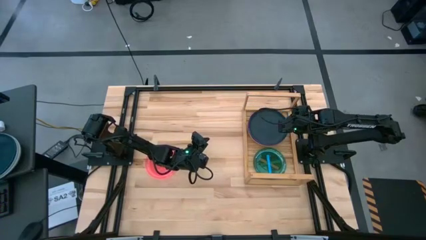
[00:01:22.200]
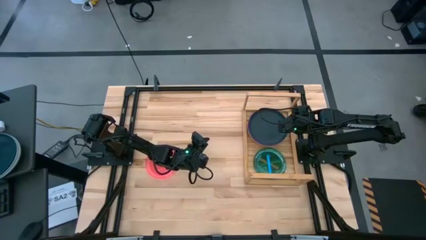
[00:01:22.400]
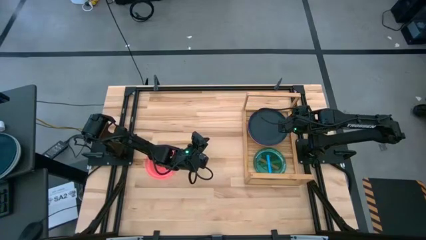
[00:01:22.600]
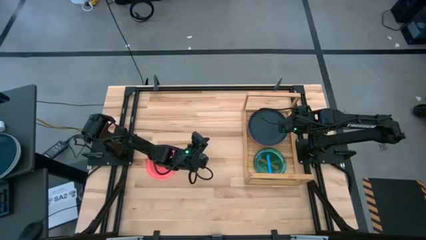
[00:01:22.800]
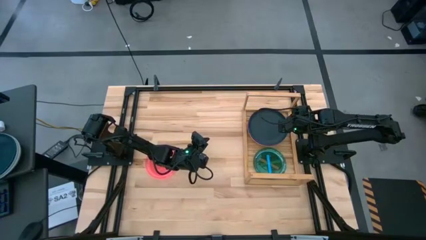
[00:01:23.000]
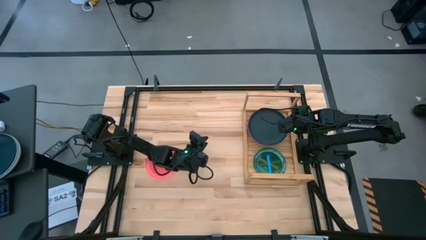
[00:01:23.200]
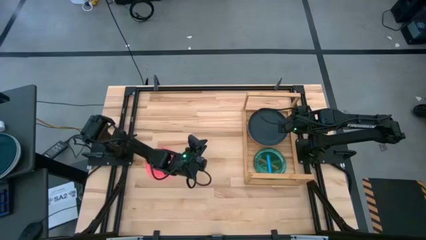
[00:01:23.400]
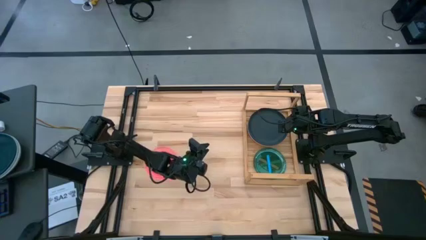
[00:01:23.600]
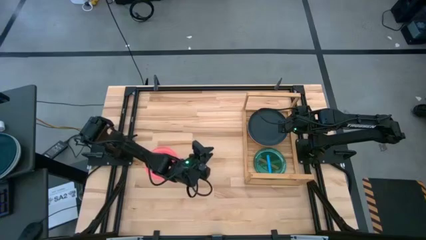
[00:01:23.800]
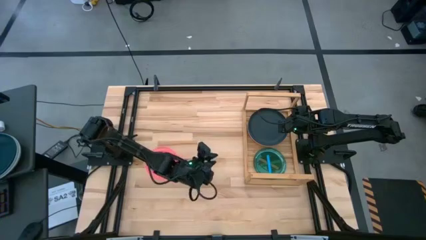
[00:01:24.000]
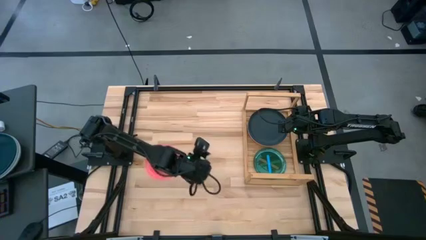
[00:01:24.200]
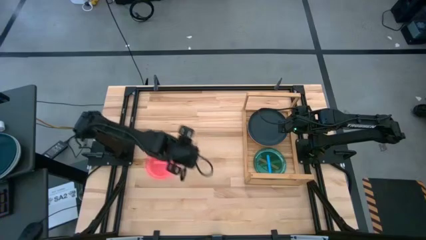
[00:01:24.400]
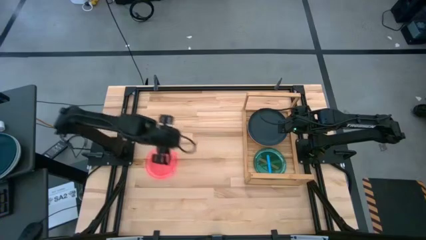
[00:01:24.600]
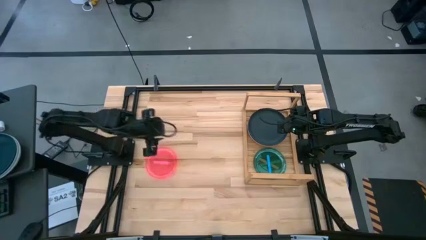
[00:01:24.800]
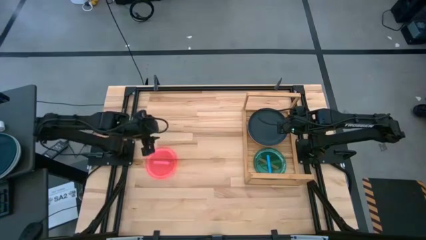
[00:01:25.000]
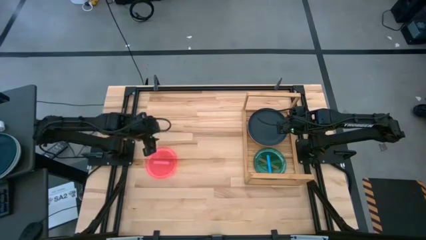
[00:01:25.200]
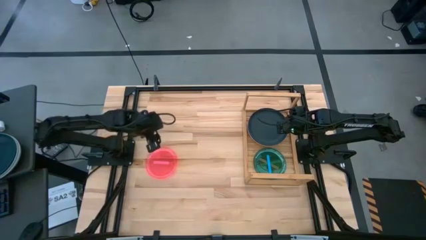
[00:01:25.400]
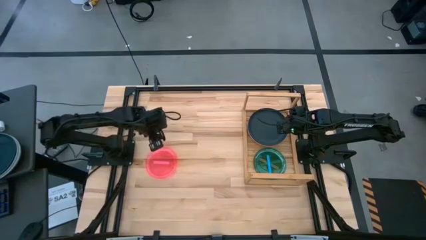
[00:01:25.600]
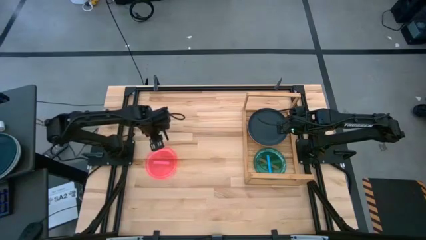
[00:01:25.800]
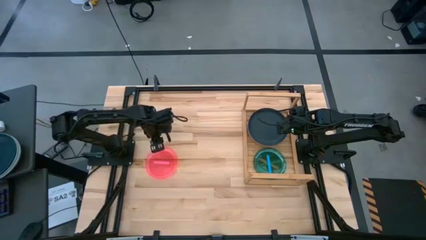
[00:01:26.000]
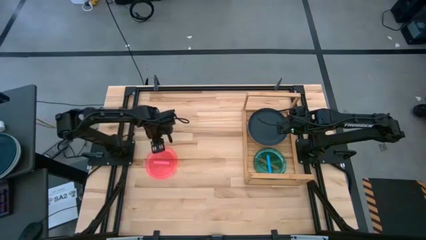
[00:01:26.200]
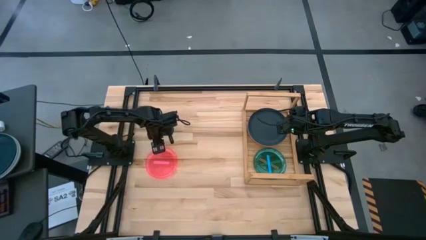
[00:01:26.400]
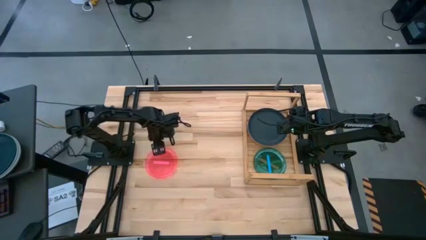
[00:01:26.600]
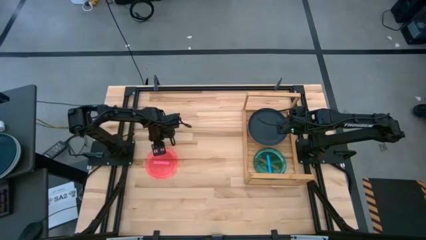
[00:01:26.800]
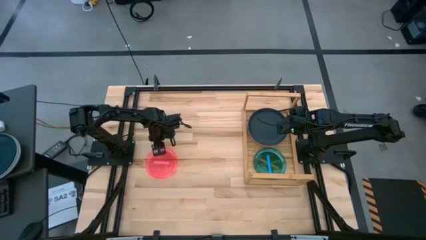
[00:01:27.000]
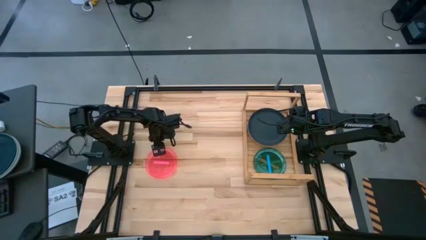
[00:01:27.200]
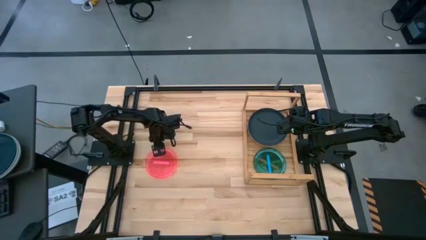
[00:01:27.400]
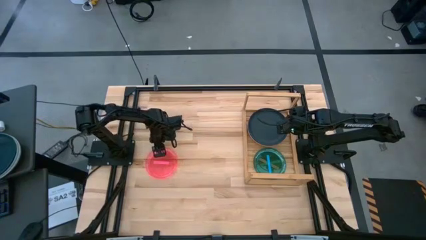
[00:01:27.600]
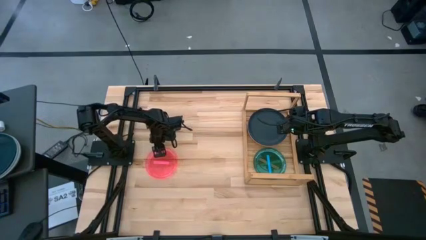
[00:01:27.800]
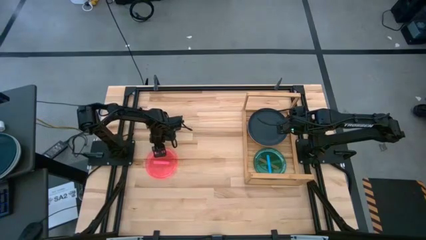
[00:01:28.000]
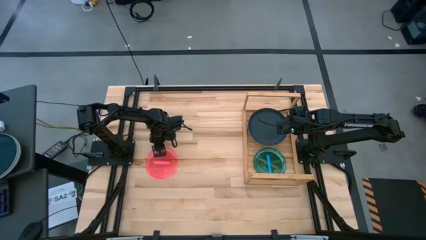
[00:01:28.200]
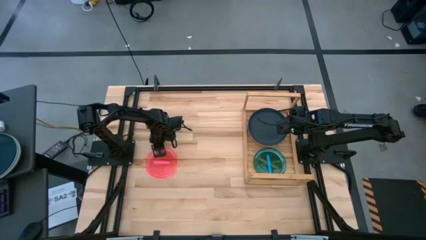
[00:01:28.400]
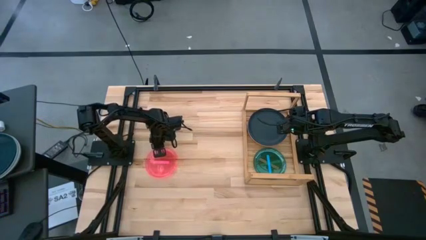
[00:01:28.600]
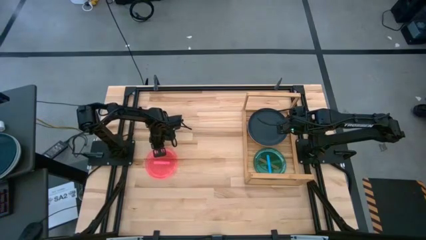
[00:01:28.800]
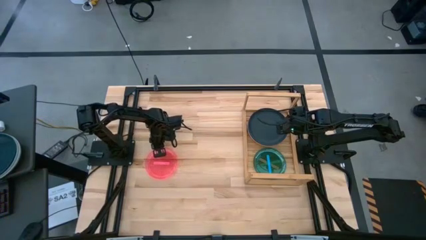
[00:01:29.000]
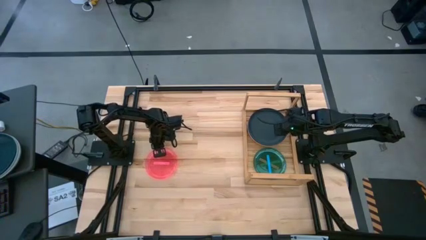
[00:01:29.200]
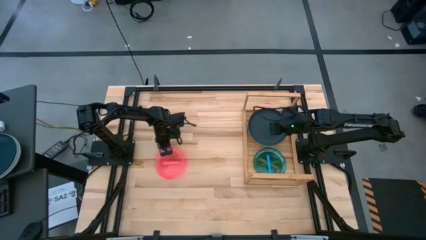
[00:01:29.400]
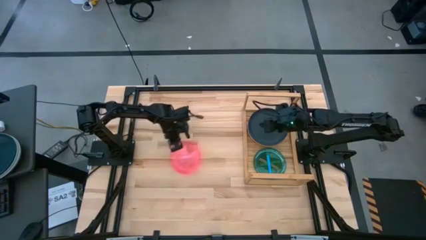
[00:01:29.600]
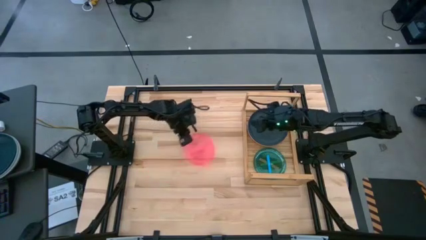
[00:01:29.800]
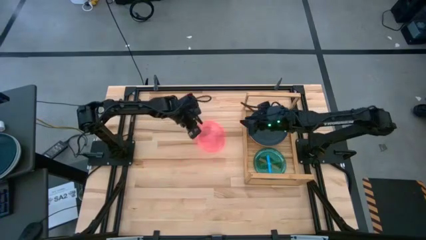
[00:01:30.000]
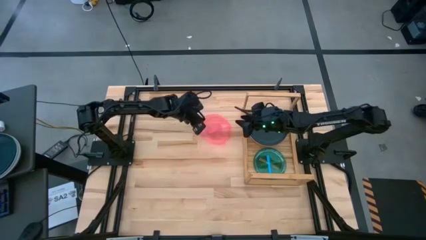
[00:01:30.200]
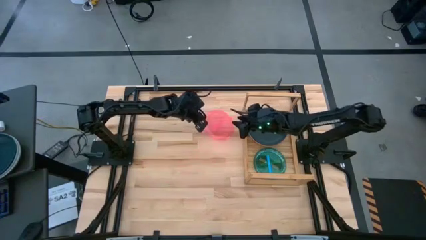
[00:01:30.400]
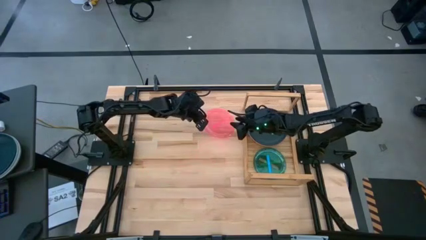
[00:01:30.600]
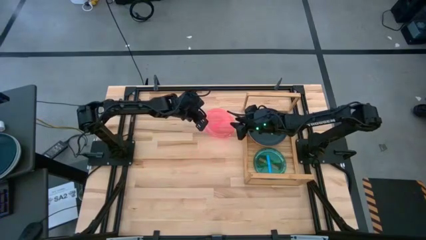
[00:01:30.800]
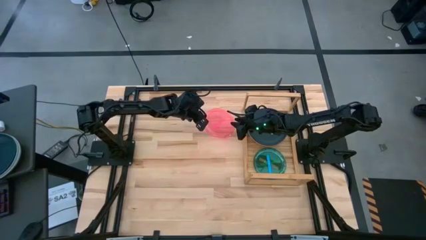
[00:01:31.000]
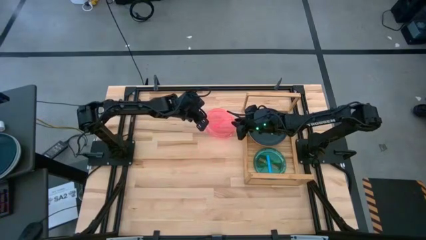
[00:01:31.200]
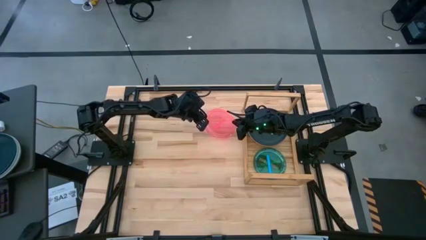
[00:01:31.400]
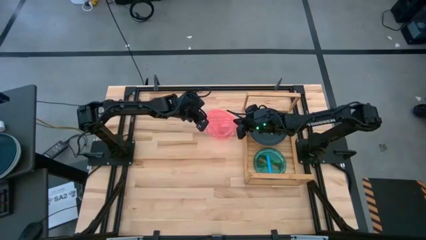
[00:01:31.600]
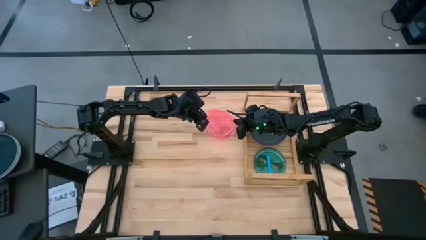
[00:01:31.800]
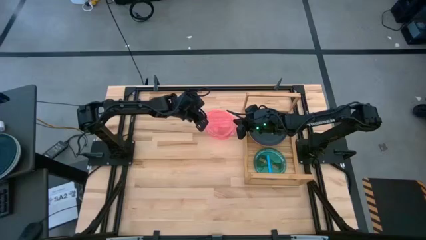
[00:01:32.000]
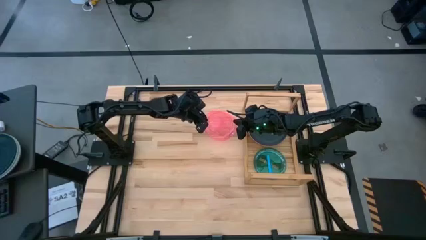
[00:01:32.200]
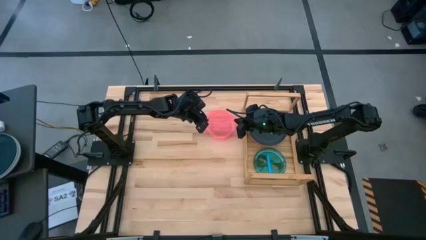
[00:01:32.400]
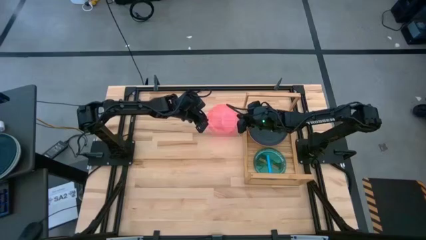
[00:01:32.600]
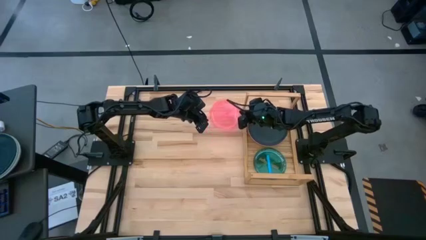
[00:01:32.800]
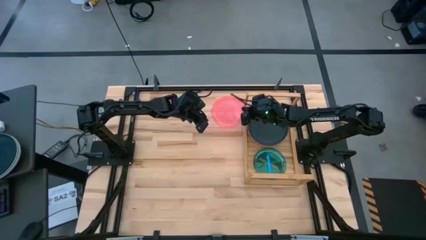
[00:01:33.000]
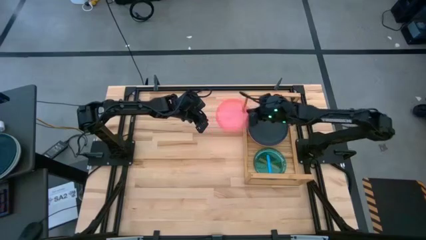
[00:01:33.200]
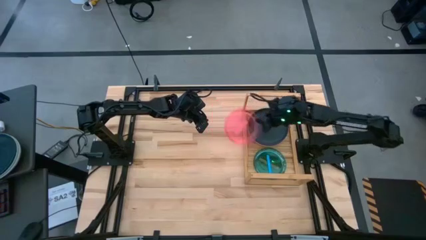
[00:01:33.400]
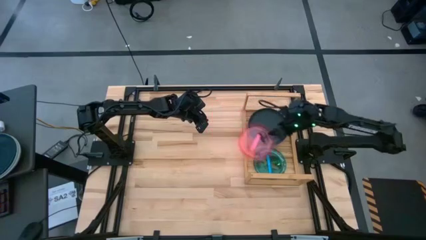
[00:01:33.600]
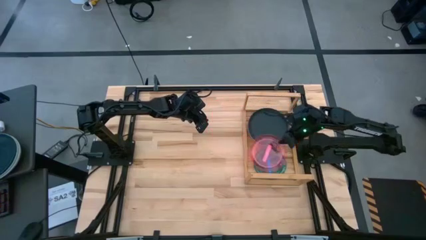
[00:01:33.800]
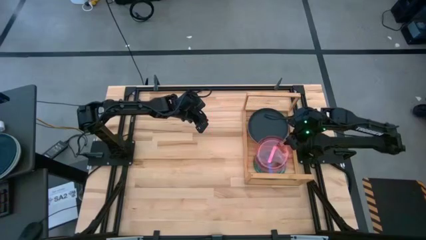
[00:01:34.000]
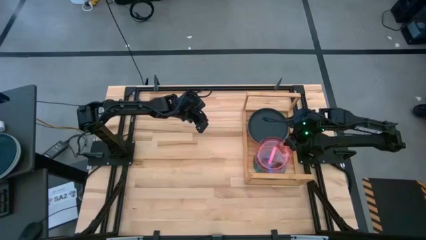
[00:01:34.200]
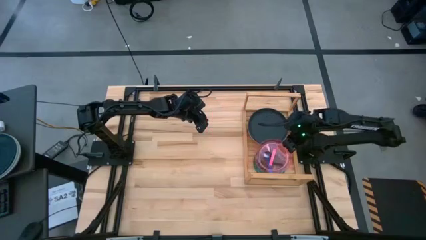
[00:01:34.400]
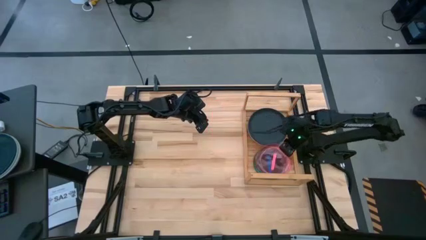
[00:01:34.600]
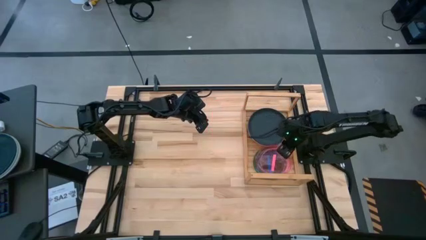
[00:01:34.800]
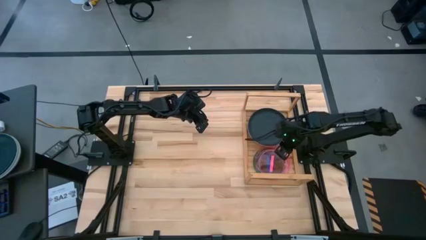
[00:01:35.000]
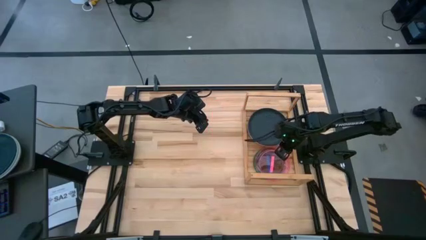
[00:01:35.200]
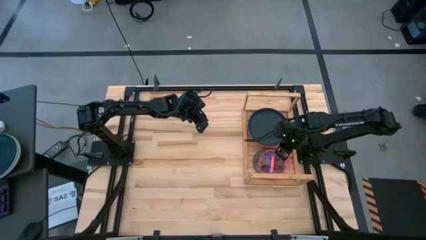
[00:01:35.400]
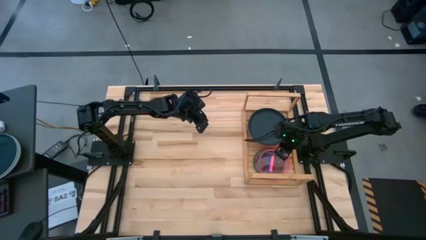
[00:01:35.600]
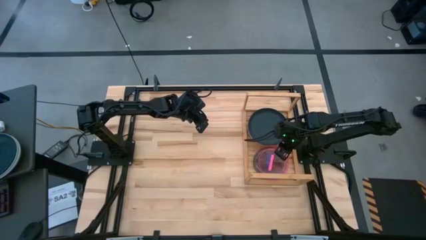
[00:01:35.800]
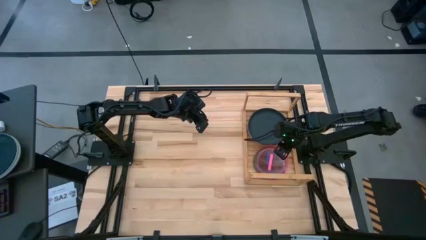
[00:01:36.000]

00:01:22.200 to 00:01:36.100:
Task: Place and stack plates onto a shelf
Stack the pink plate on top of the blue plate on the shelf

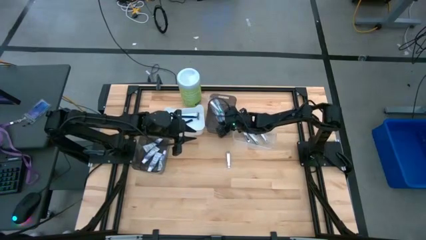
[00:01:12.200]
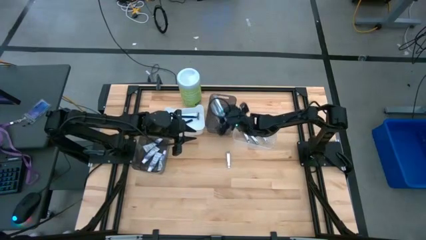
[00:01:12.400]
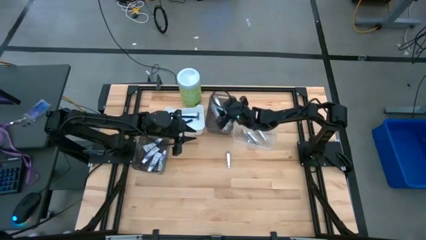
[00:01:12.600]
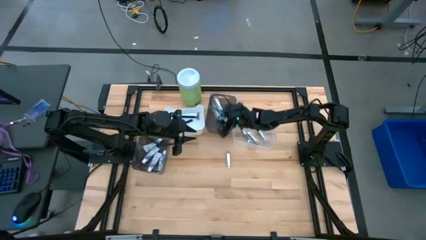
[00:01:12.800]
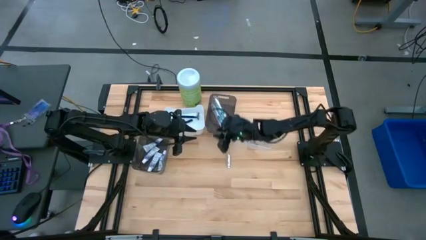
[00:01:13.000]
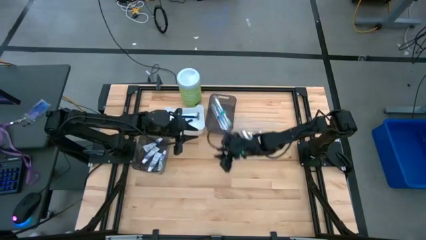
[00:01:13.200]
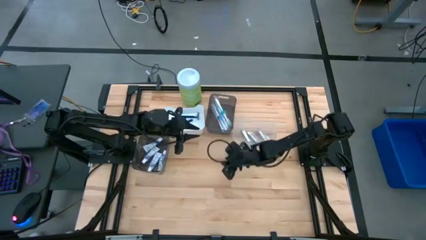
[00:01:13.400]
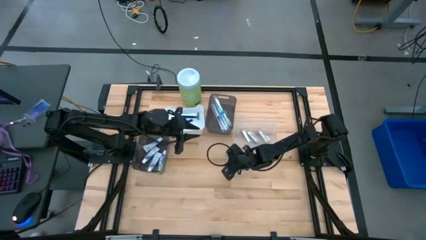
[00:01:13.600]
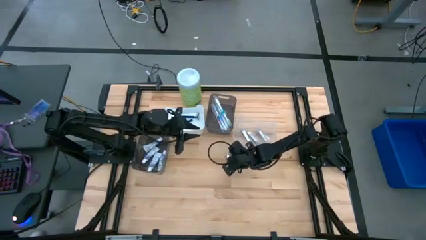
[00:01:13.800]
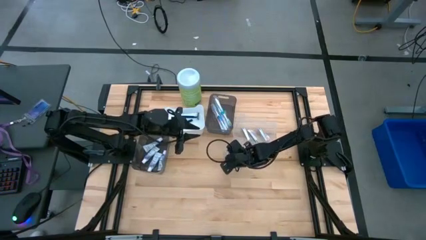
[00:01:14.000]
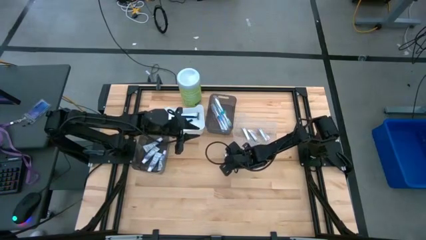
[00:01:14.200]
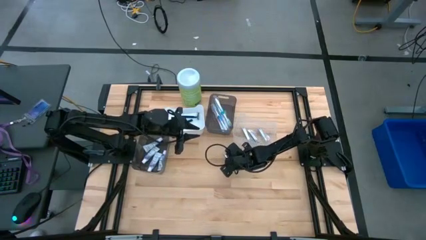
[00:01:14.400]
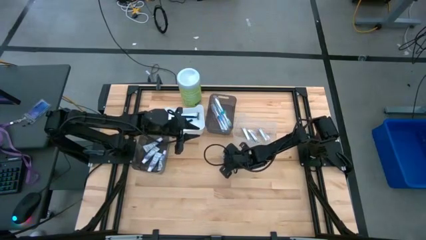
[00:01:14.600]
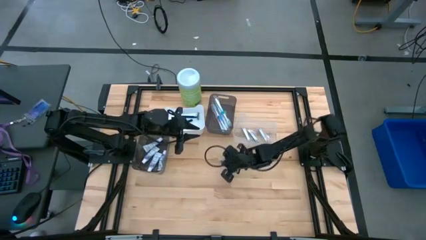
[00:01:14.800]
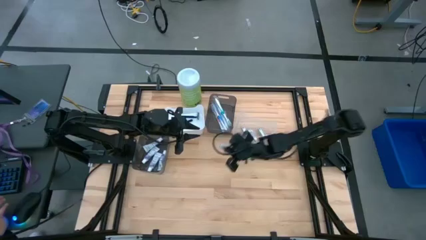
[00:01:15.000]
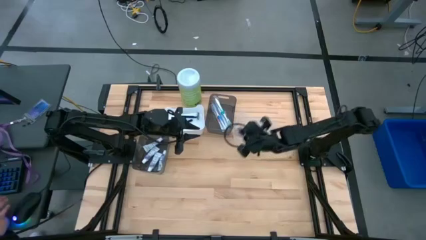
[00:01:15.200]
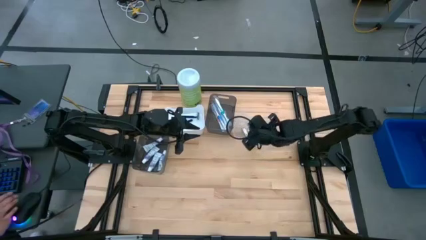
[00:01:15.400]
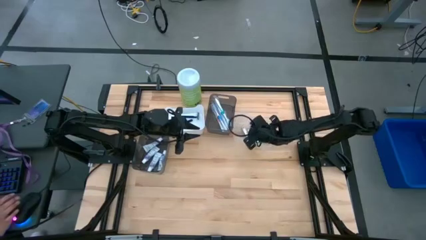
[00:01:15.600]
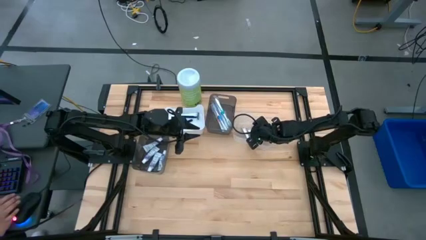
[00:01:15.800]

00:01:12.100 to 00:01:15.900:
Task: Pick & Place Travel size toiletries
Put the silver nail cutter into the transparent bin
